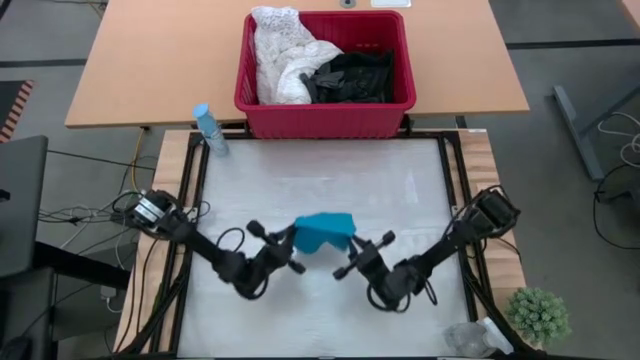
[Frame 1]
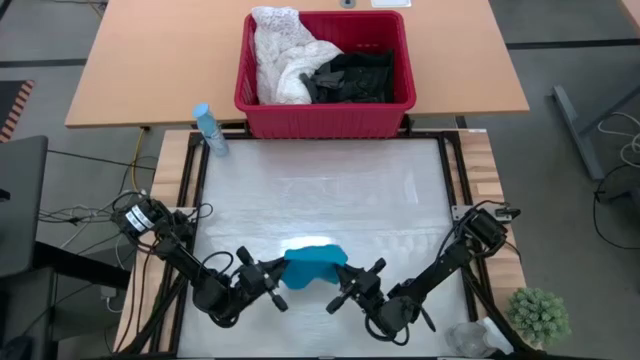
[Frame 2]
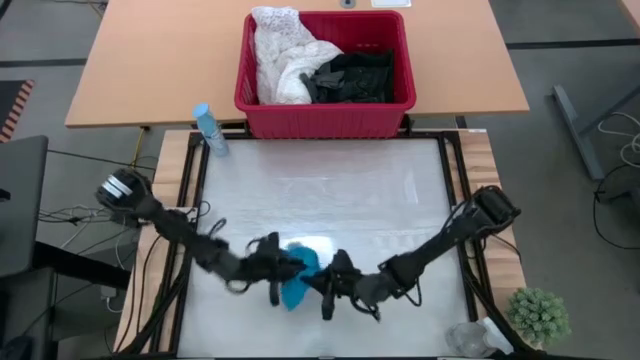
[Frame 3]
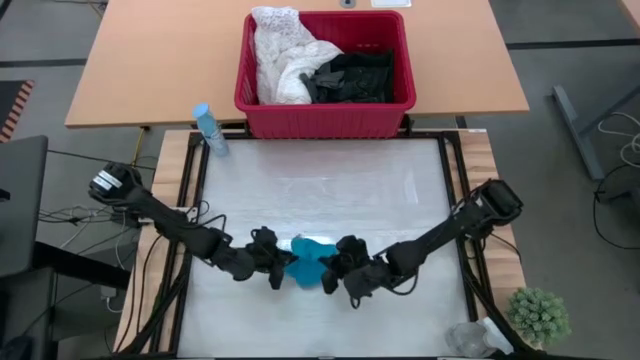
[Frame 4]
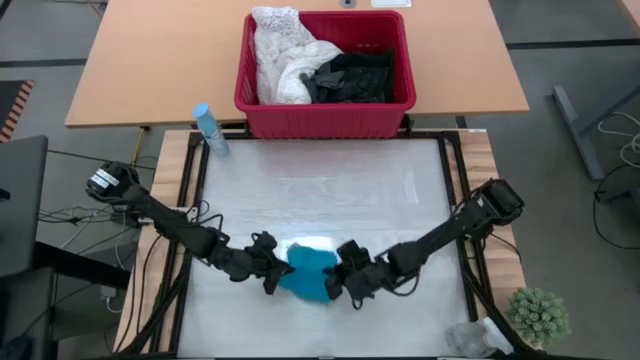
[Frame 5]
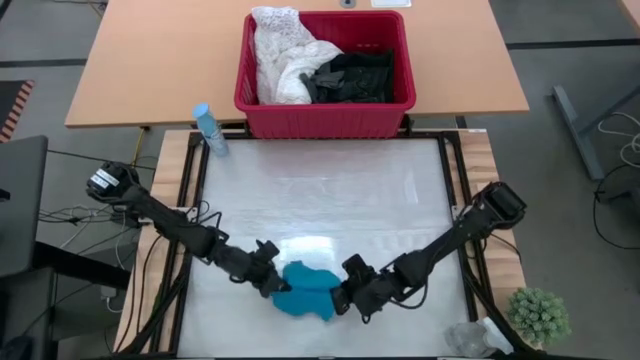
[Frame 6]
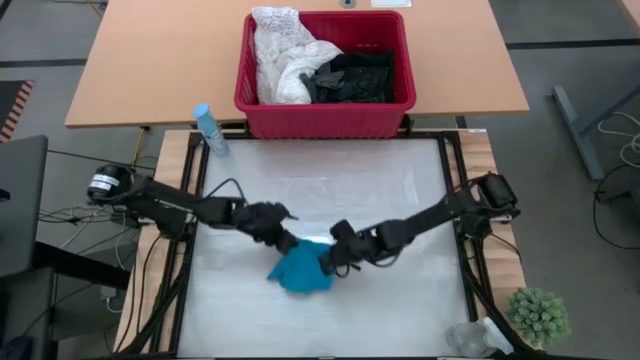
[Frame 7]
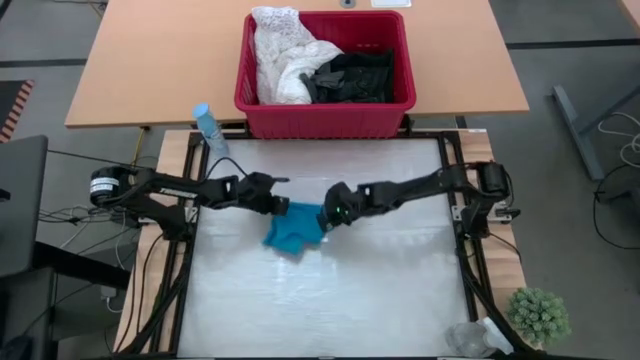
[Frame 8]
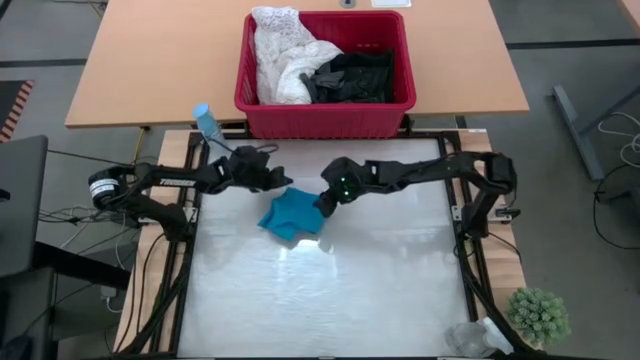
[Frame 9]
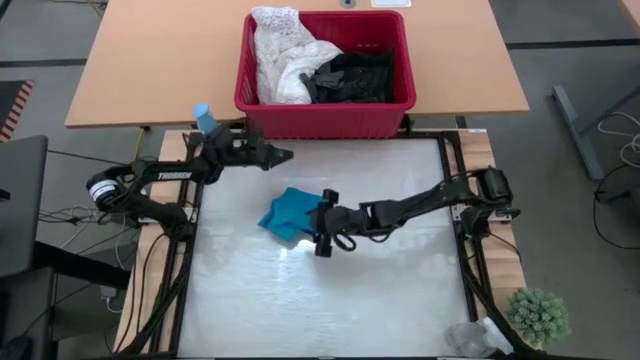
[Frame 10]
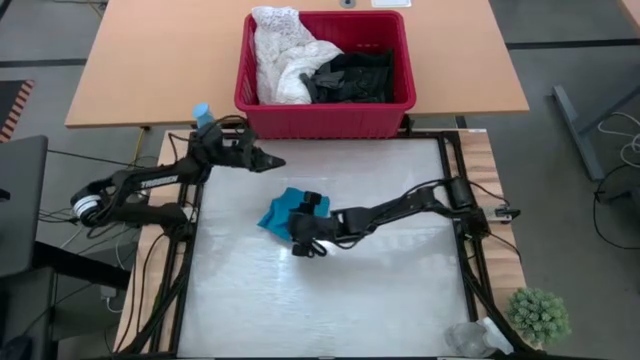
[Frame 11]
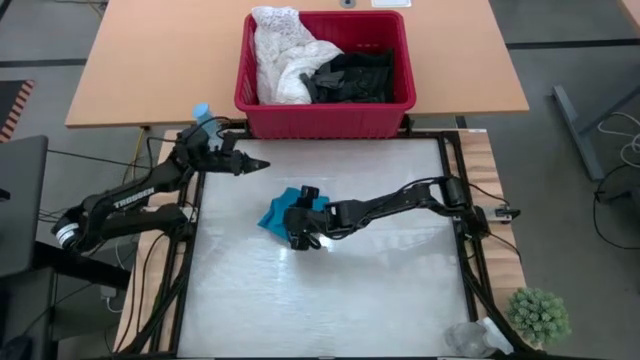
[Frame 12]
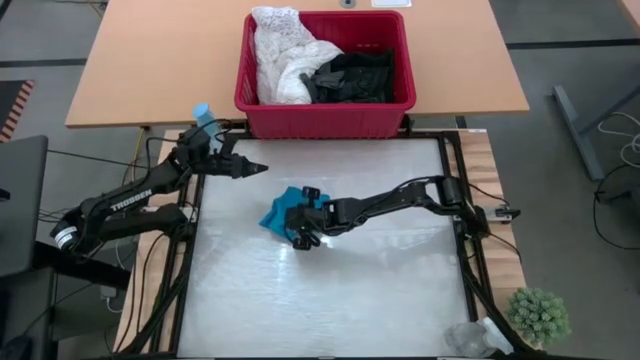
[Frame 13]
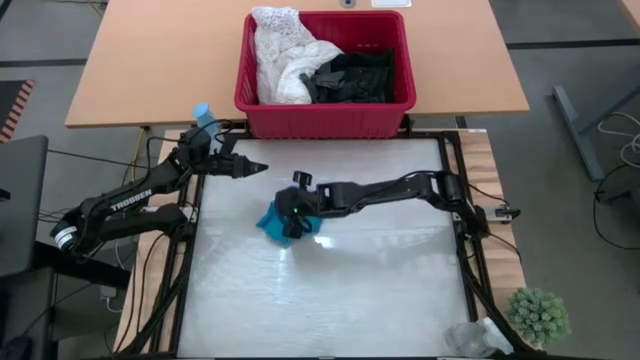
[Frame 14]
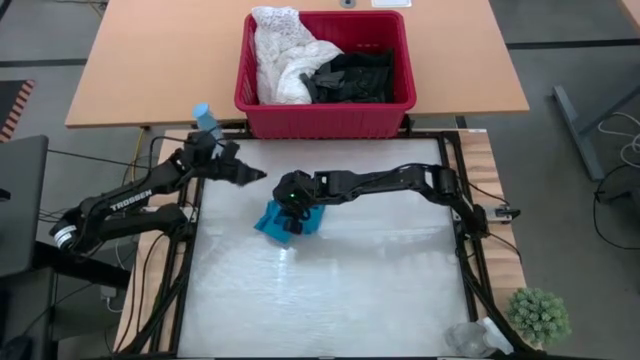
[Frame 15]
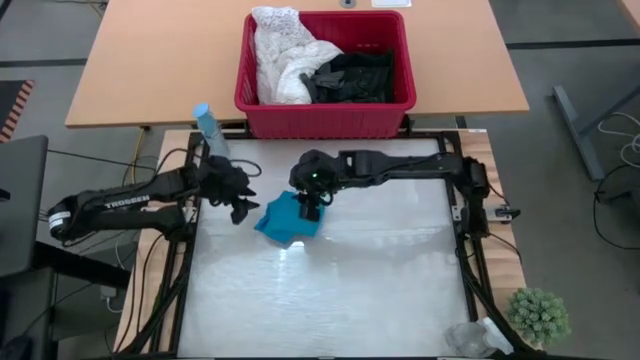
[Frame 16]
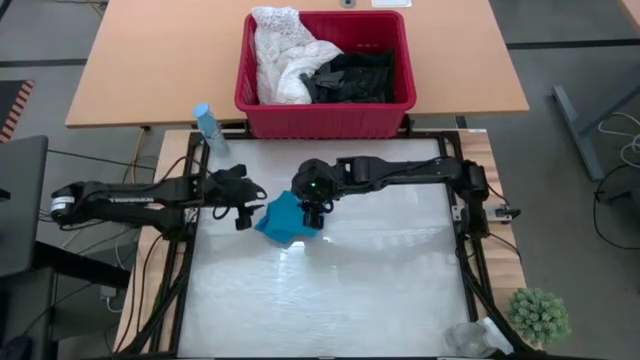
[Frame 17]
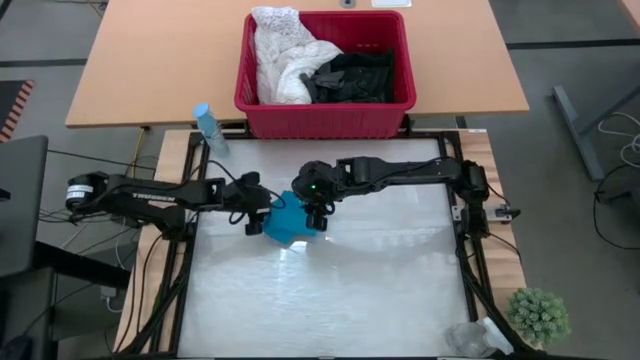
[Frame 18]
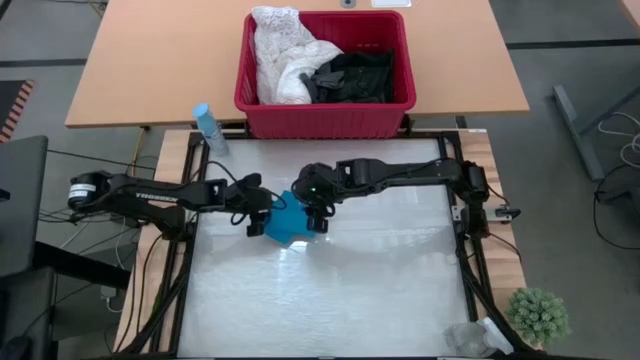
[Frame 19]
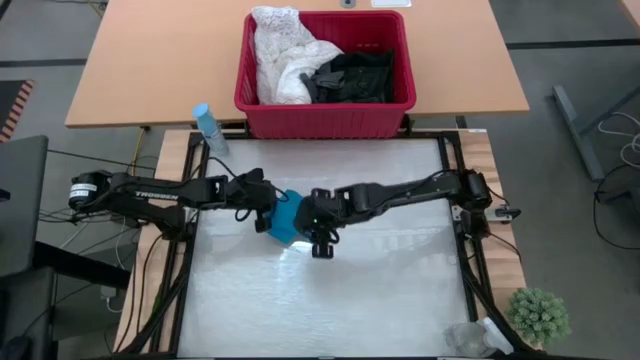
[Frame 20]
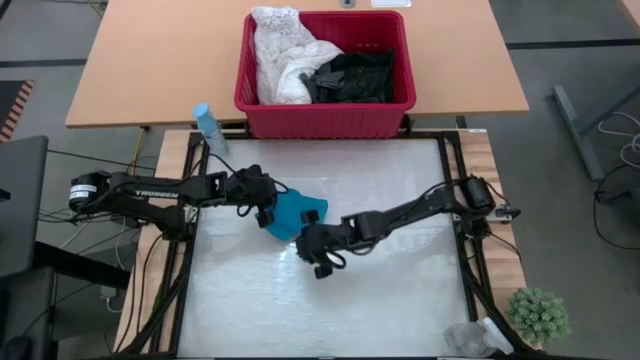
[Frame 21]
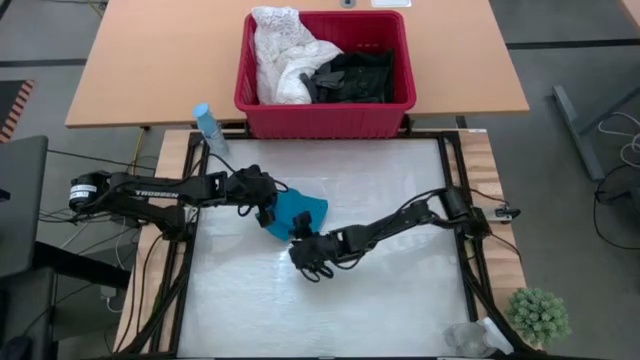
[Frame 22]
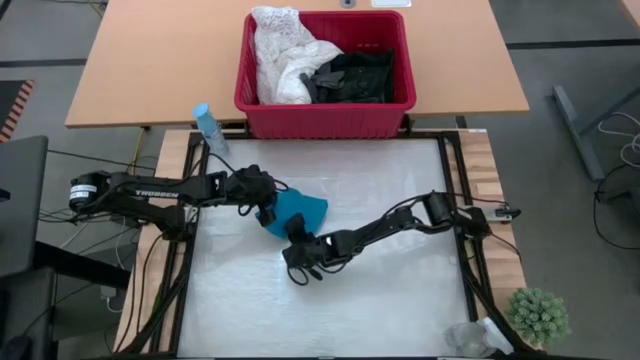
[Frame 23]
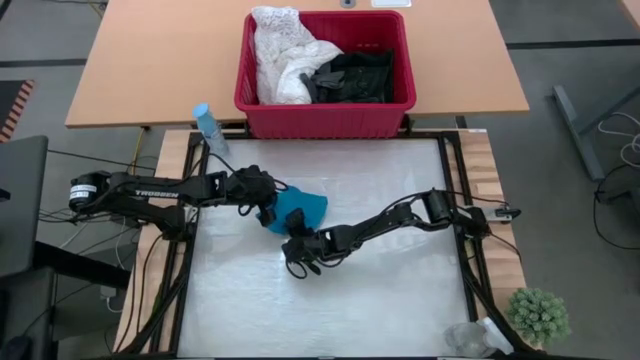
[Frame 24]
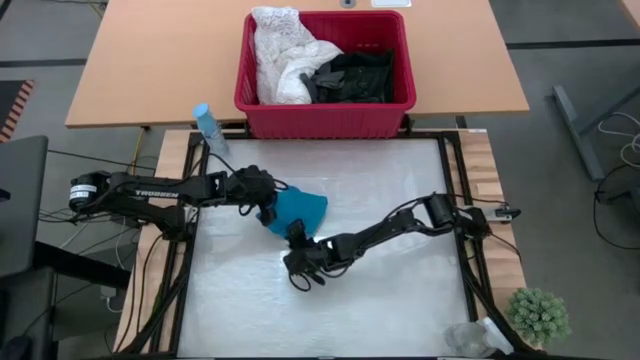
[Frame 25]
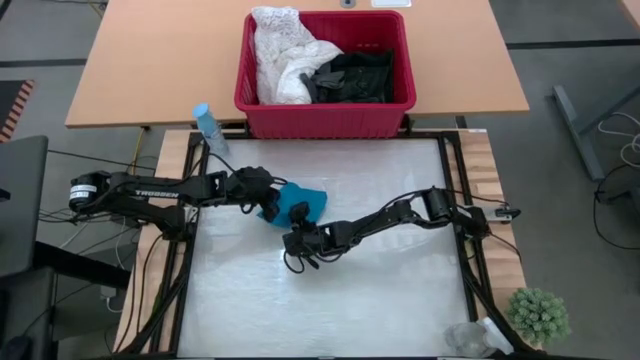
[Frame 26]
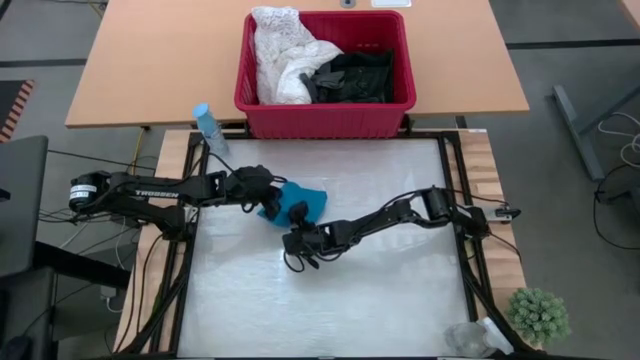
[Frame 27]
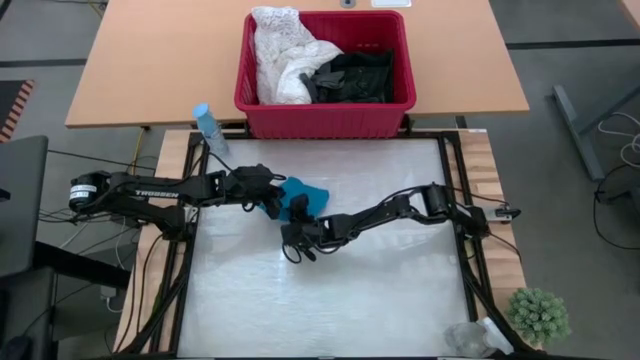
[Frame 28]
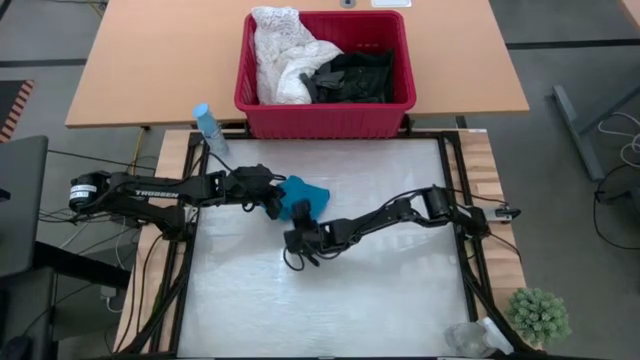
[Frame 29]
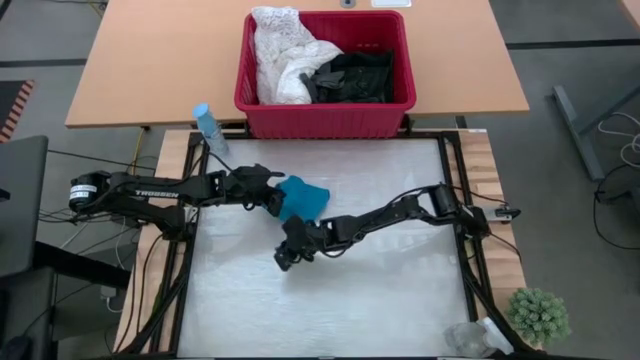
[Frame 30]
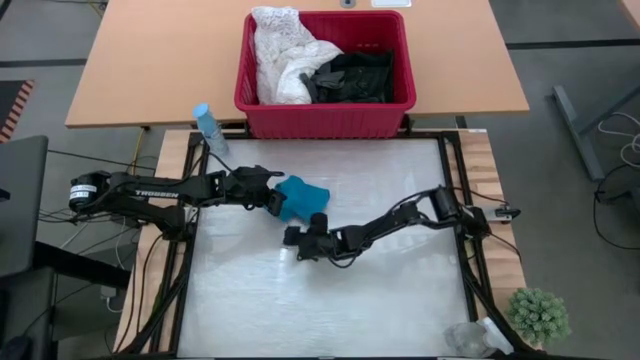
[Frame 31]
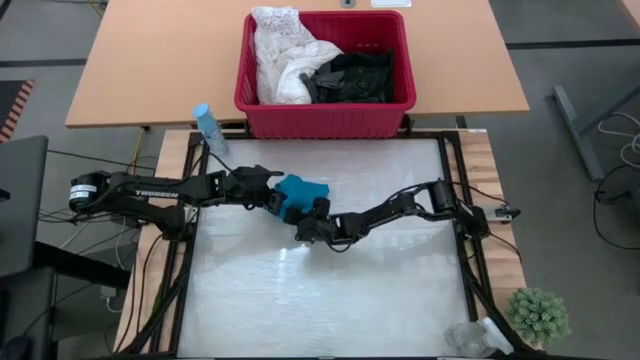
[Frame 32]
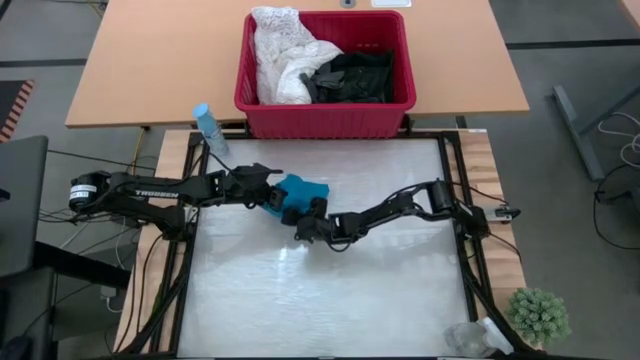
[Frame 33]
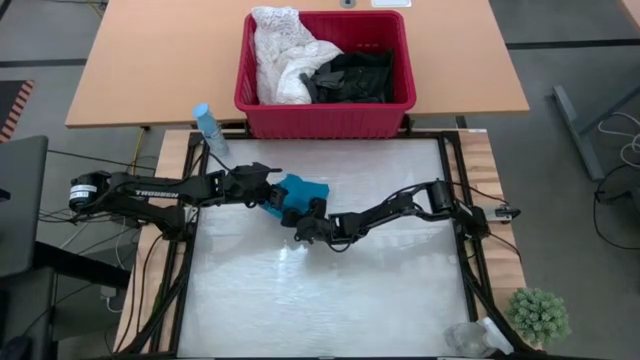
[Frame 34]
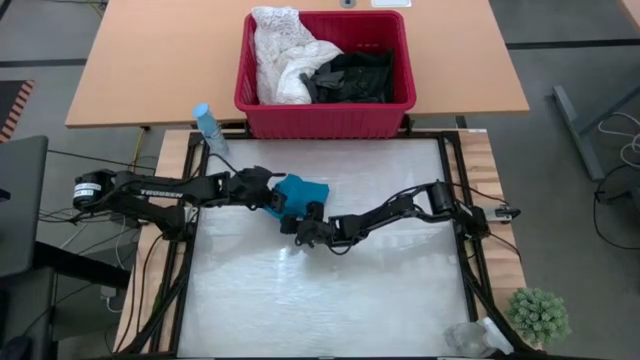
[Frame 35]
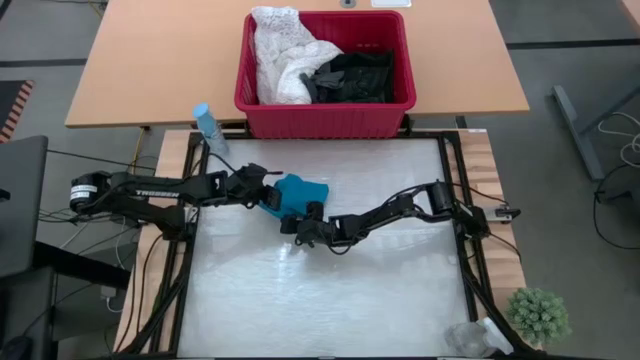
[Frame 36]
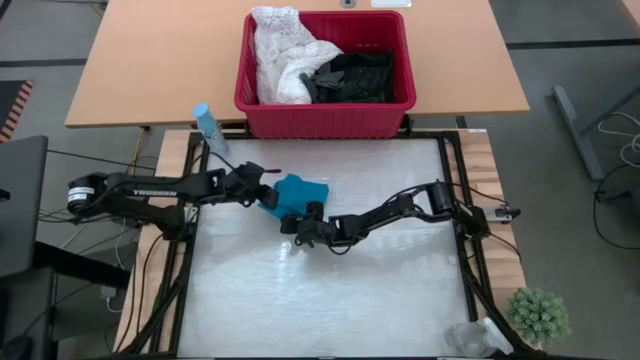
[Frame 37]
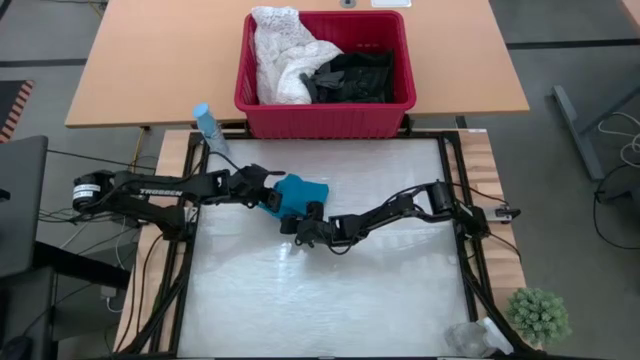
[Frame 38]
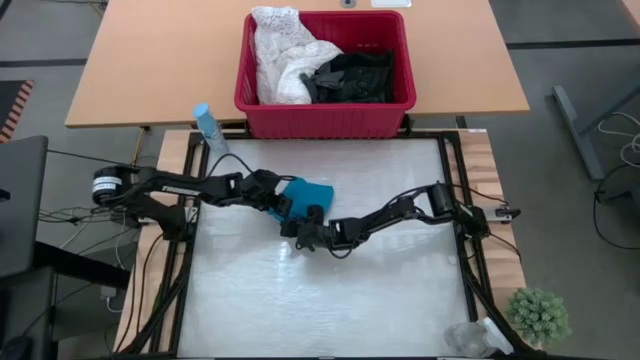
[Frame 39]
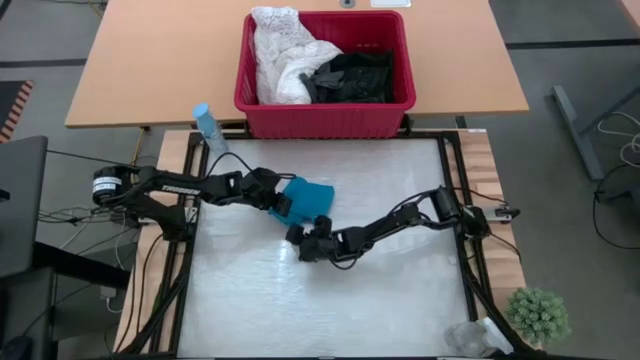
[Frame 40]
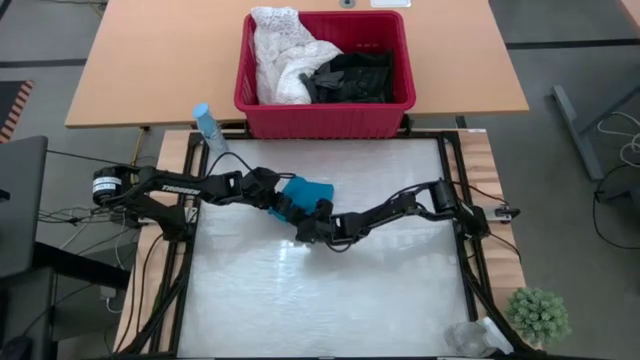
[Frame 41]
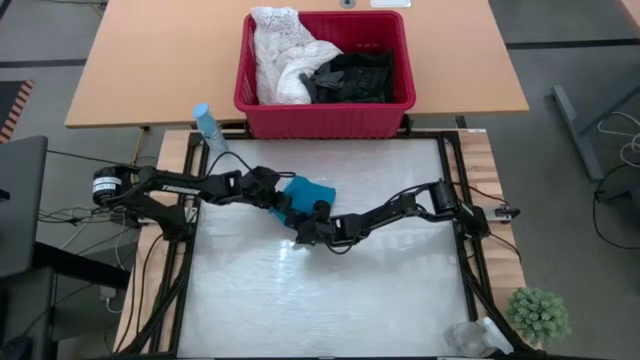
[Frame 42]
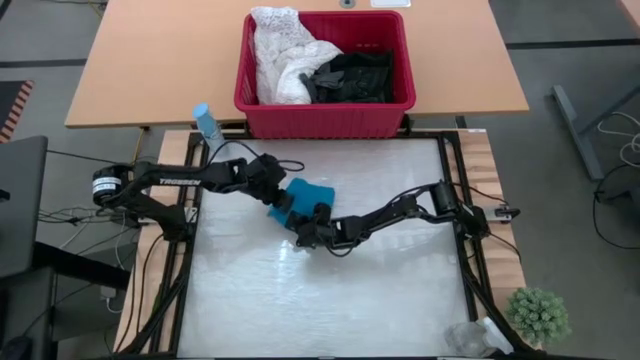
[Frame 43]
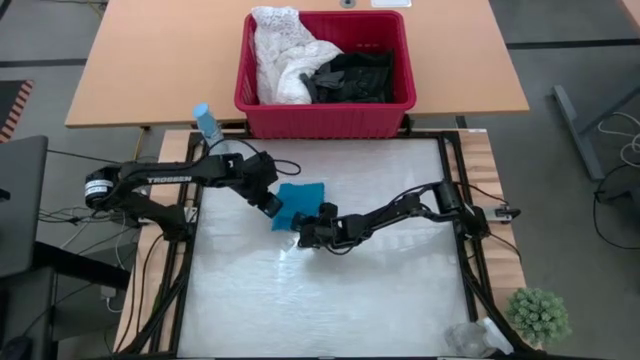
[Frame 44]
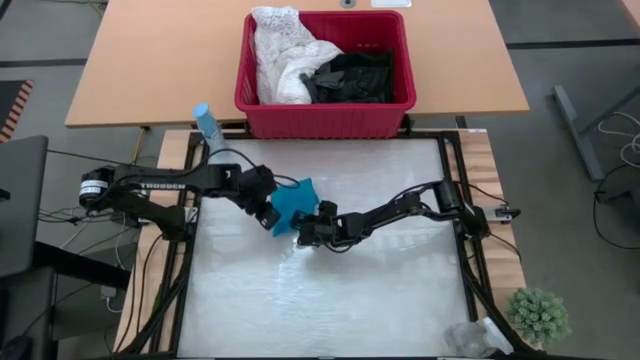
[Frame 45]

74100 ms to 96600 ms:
Task: Fold laundry
Fold the blue shorts
